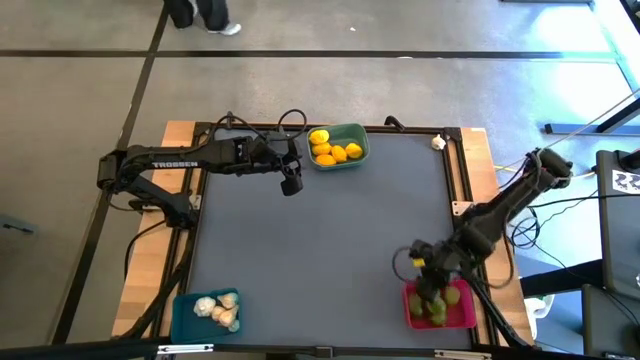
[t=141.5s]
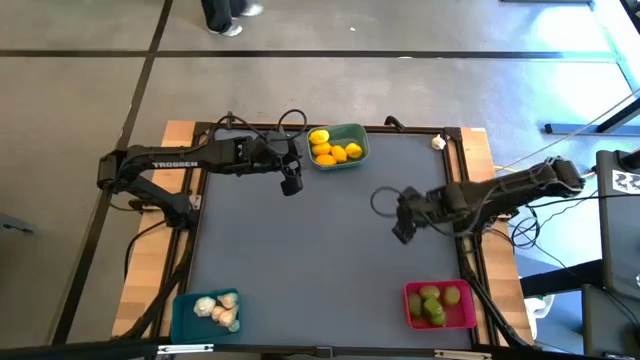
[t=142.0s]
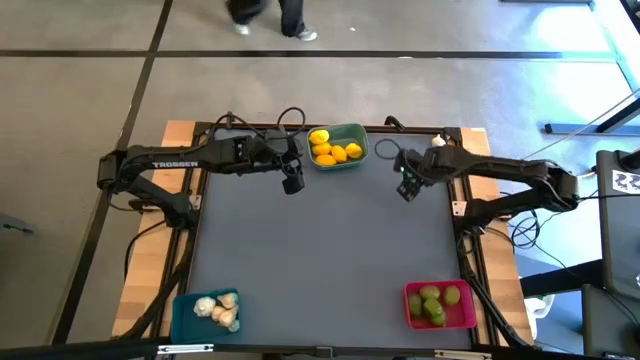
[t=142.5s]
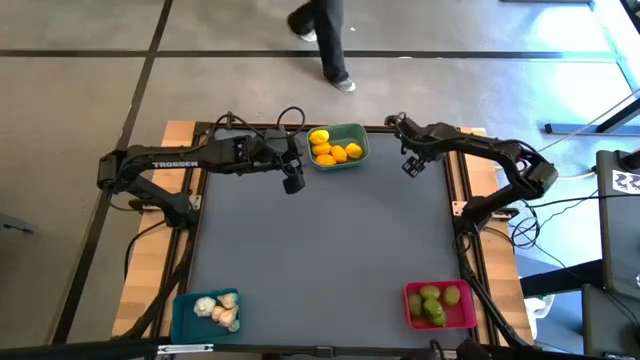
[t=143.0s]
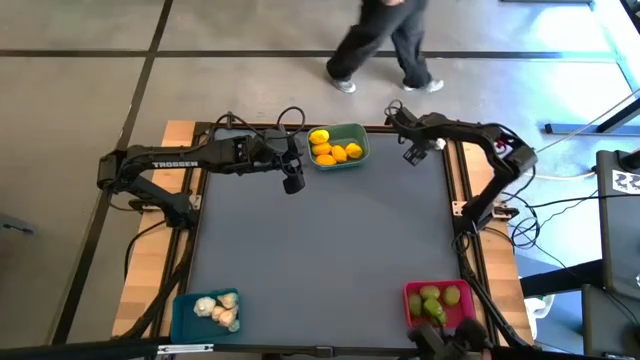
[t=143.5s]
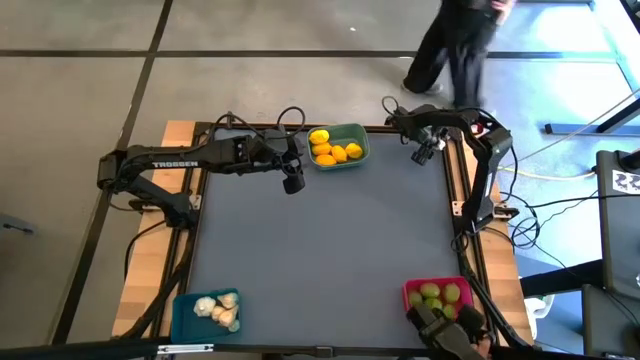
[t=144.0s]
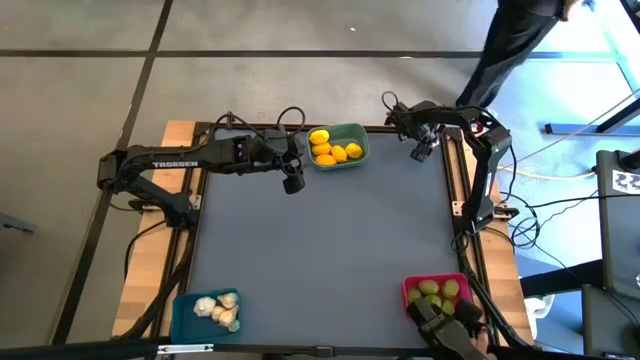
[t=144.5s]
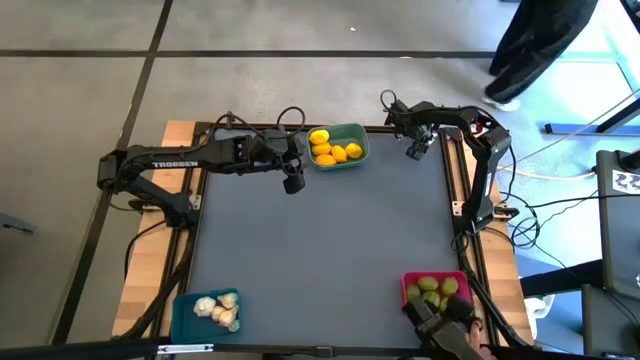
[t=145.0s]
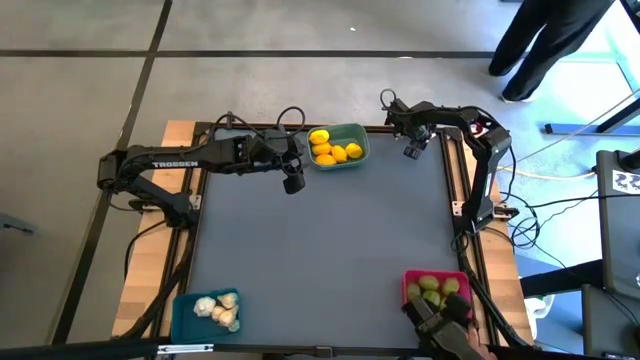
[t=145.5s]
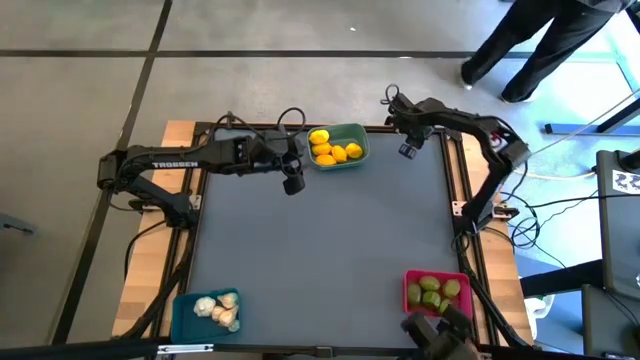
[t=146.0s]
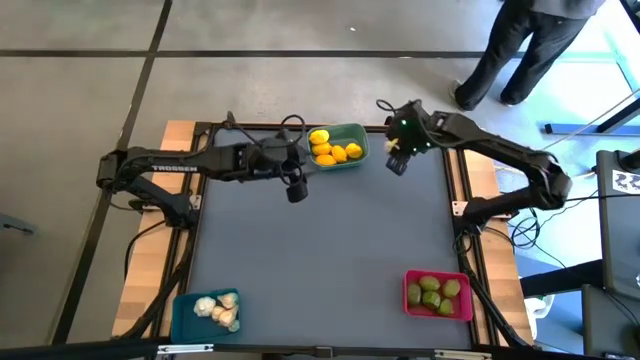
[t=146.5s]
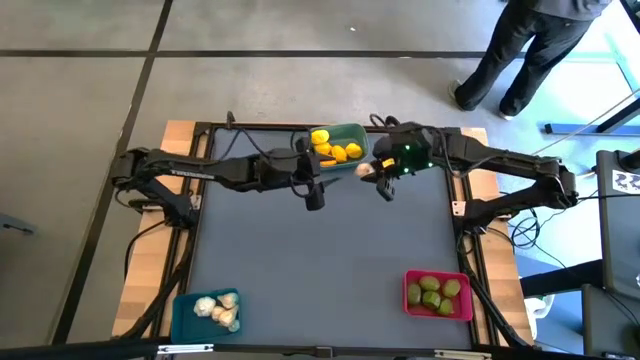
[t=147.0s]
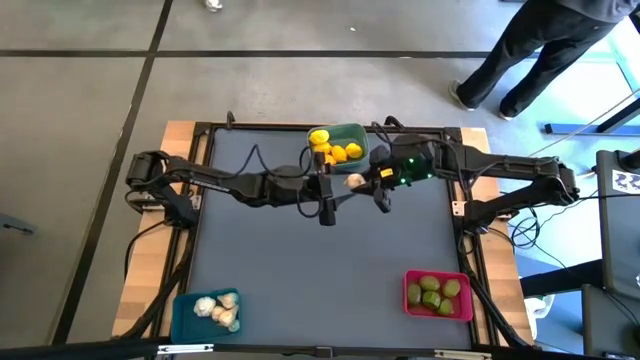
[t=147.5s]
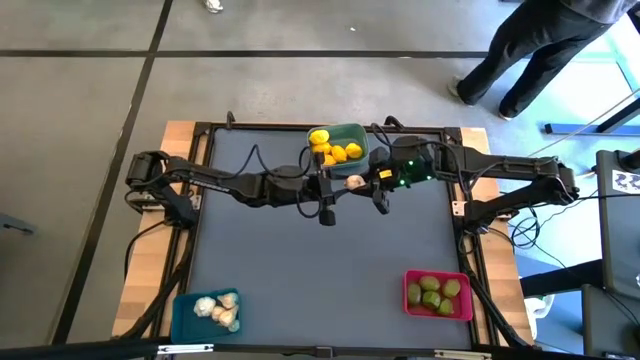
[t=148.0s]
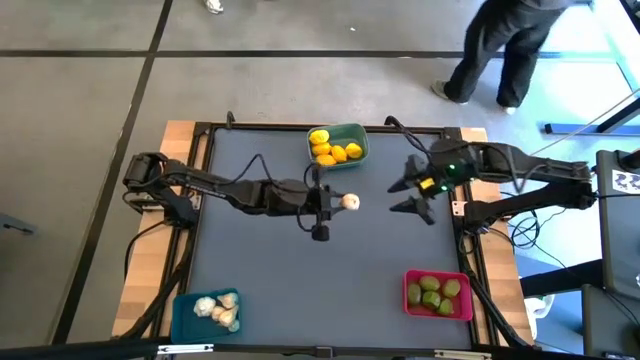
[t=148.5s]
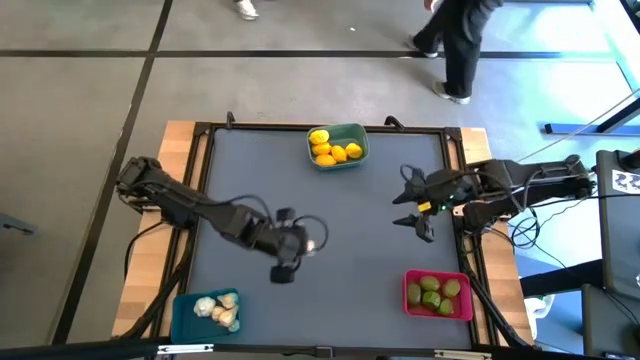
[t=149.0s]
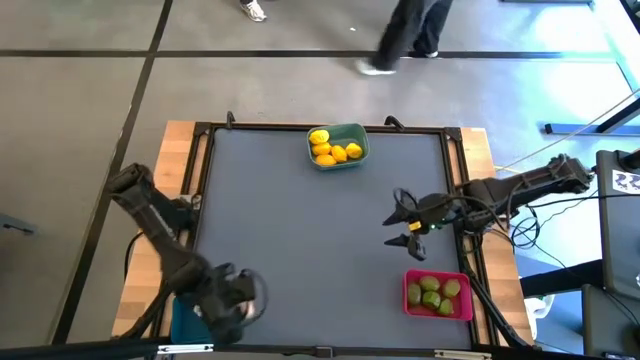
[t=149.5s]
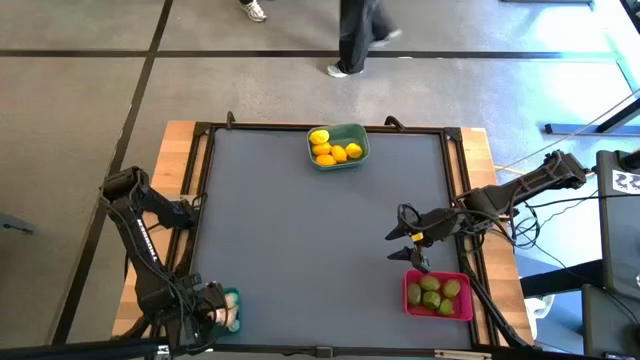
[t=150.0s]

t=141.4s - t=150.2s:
Task: Sort produce into baskets
Put the white garlic into the blue bin

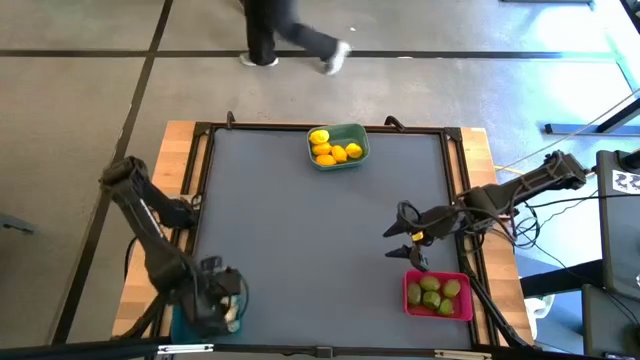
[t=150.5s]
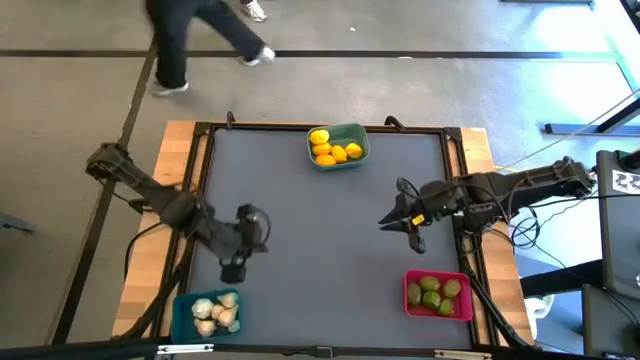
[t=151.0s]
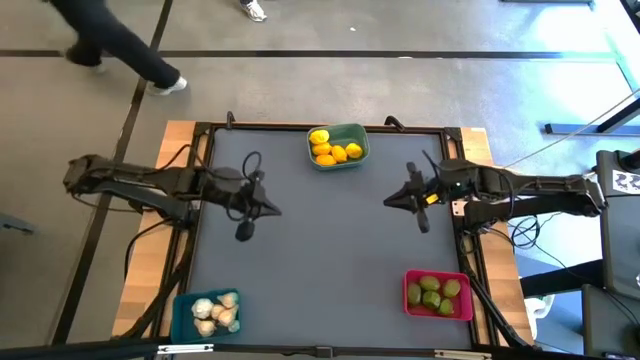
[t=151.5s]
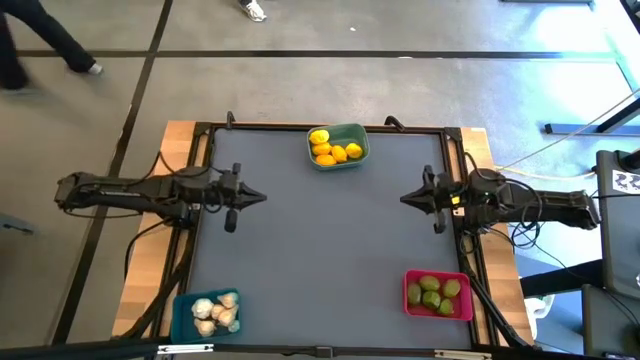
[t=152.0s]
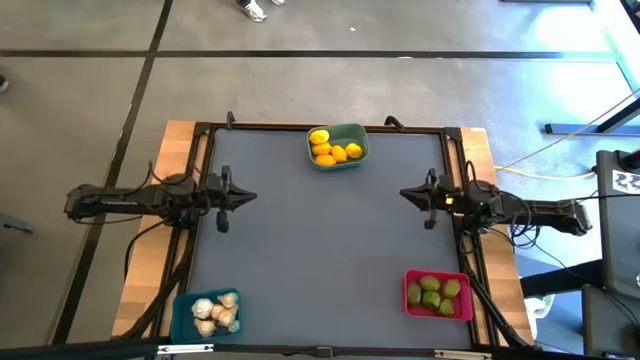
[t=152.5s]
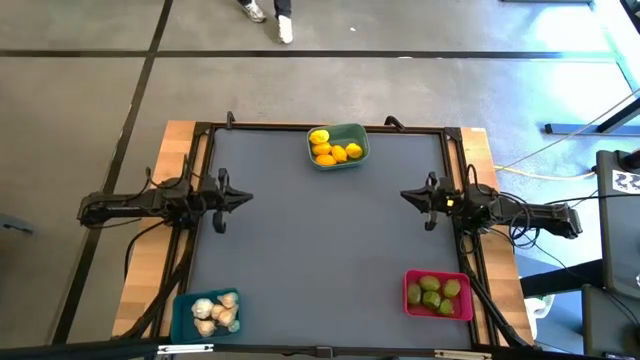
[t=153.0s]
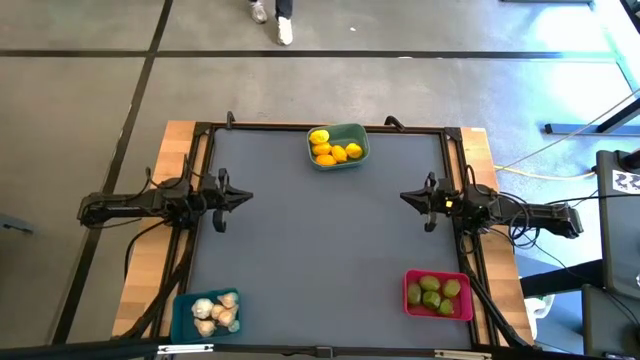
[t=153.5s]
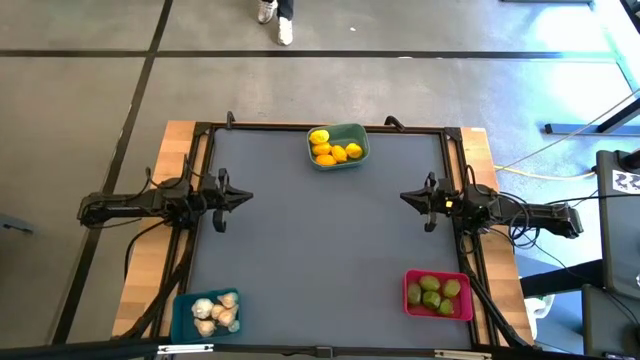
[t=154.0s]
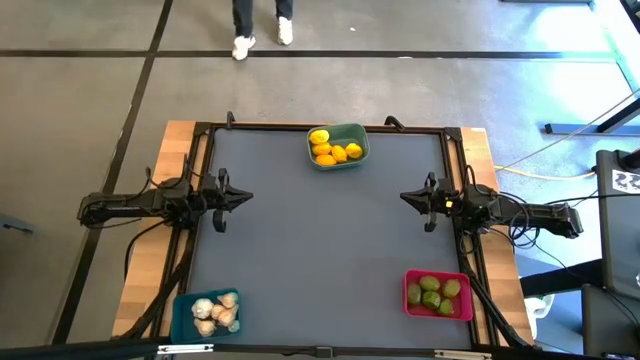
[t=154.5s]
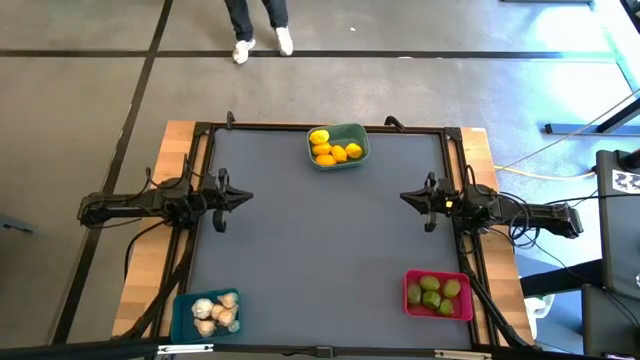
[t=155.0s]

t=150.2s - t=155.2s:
Return to Home Position

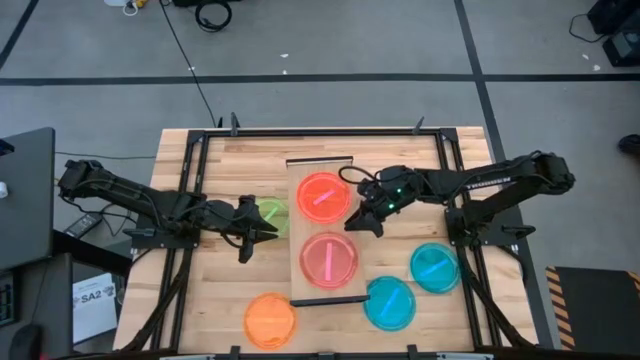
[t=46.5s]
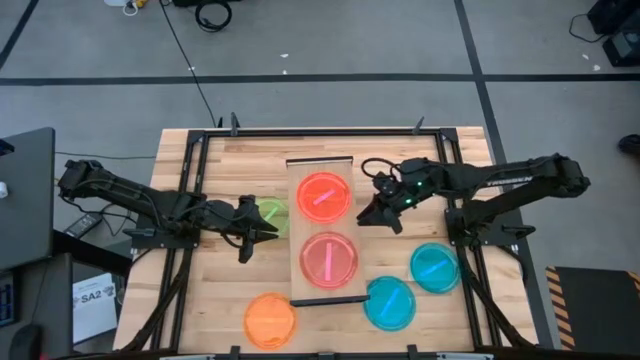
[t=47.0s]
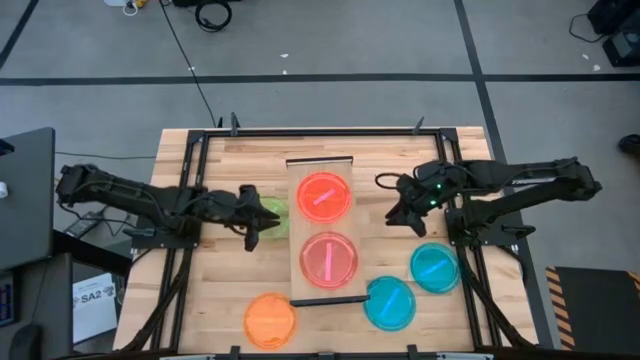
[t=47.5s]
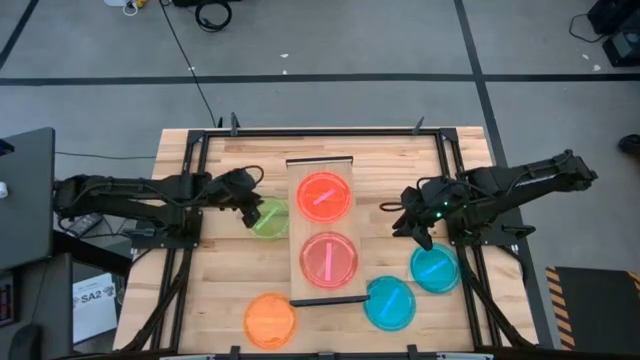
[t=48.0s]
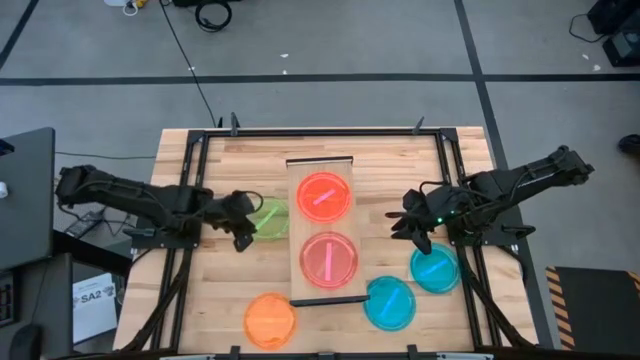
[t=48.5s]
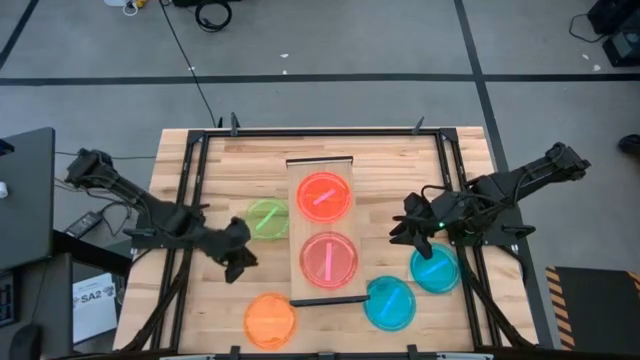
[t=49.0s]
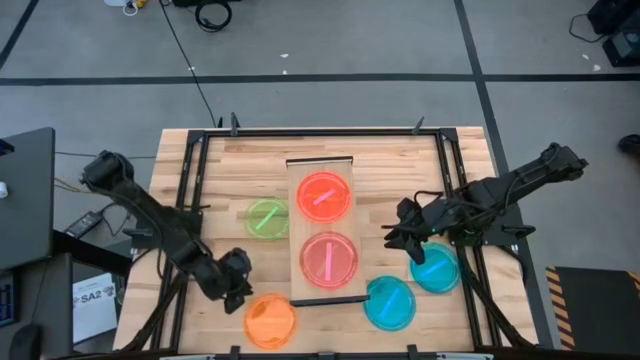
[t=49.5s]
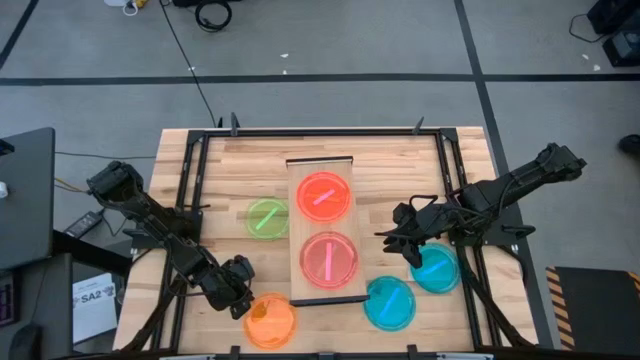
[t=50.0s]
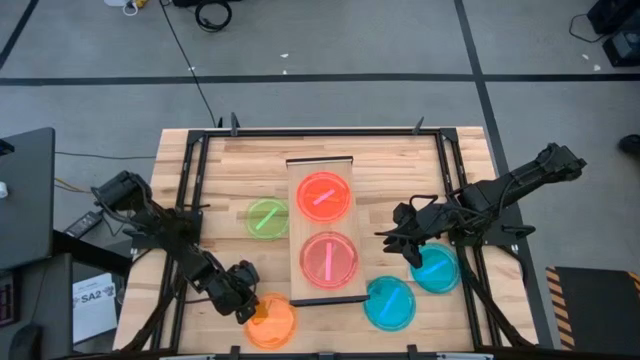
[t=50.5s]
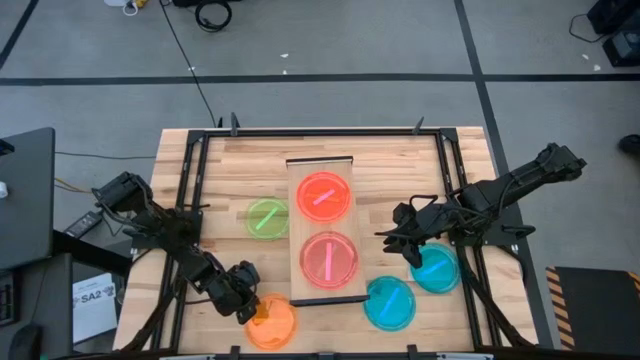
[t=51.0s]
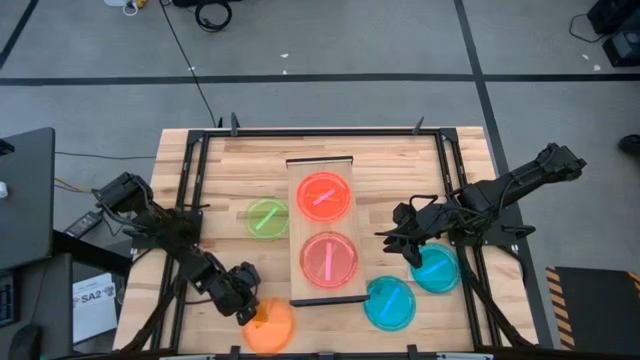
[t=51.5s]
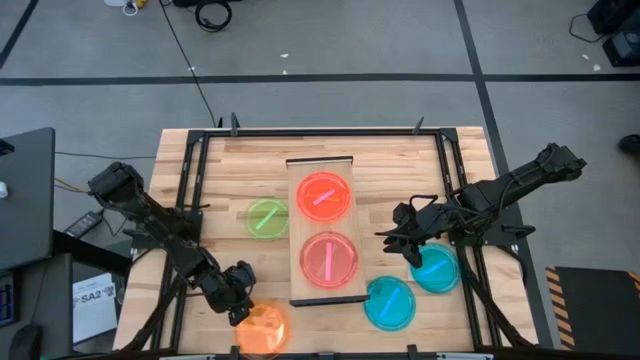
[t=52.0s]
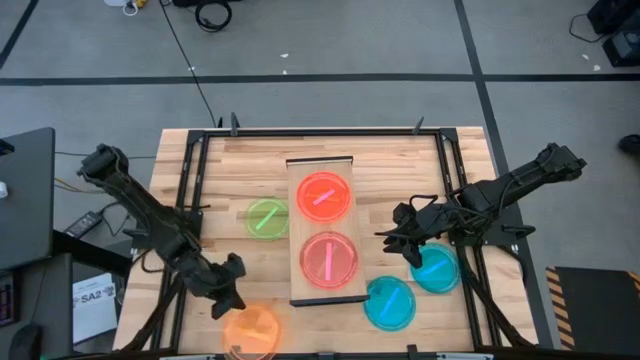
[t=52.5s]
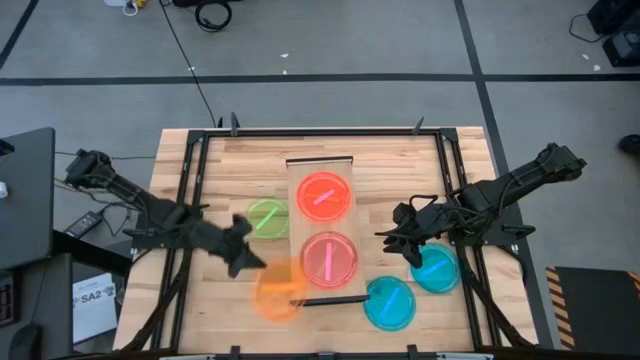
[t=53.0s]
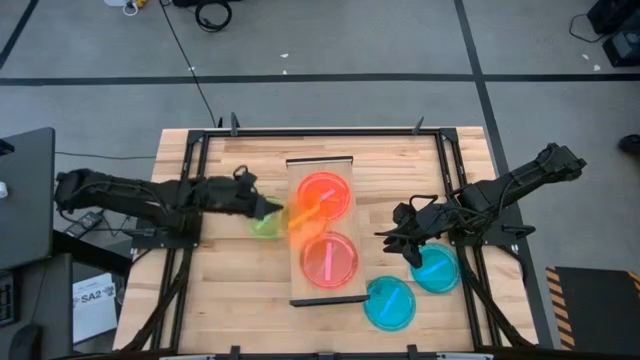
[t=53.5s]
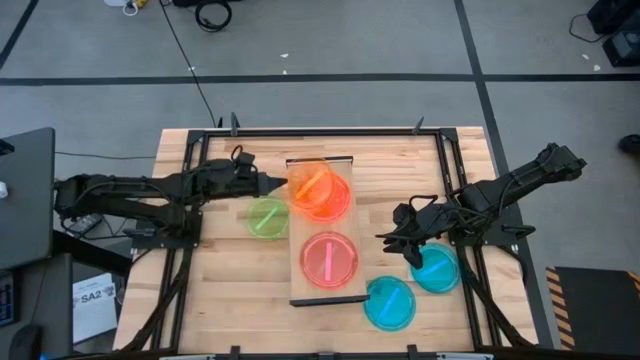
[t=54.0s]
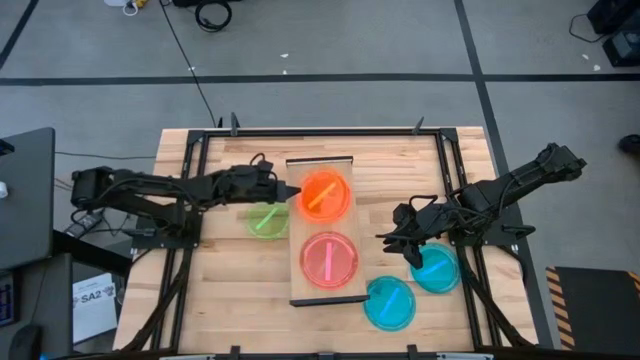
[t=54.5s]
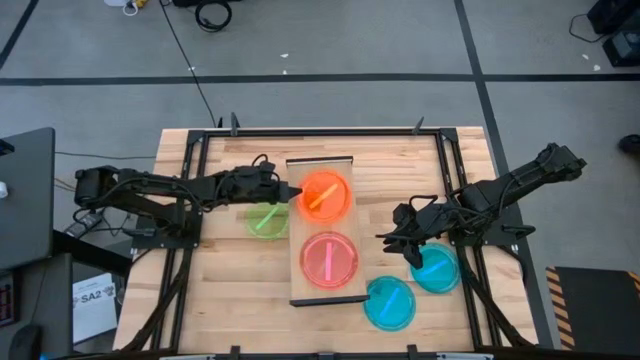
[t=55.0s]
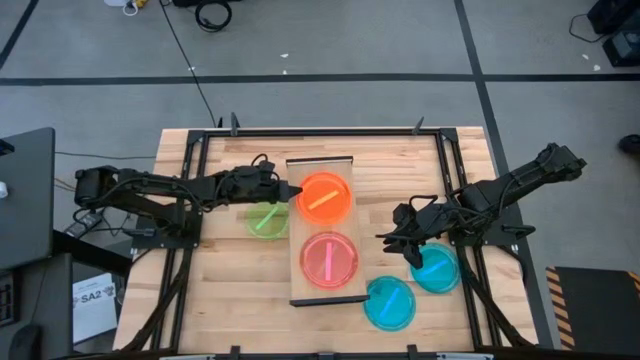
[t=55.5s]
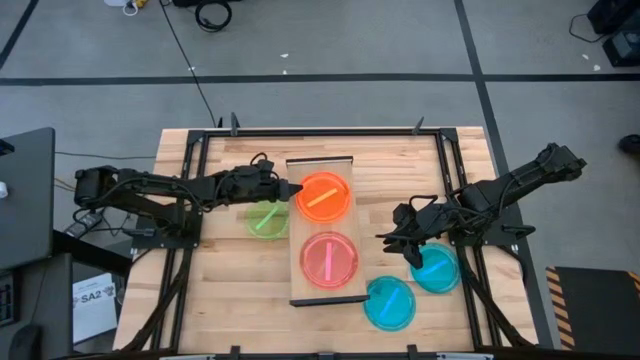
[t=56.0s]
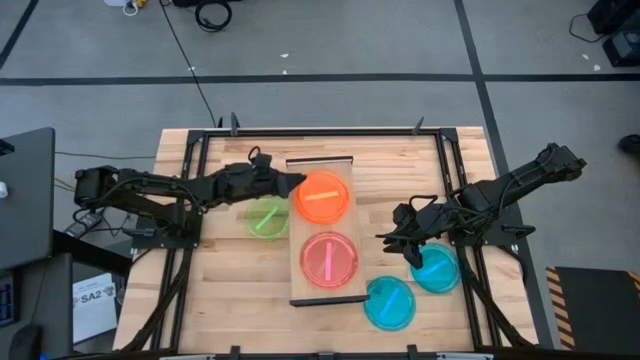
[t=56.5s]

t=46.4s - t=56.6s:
Task: Place and stack plates onto a shelf
Stack the orange plate on top of the pink plate on the shelf
